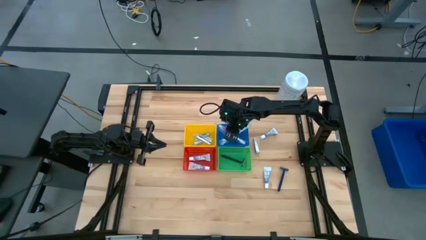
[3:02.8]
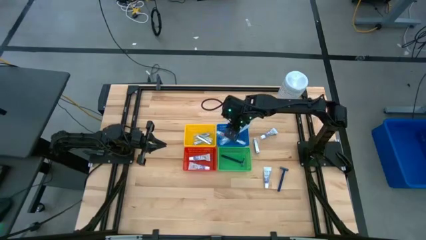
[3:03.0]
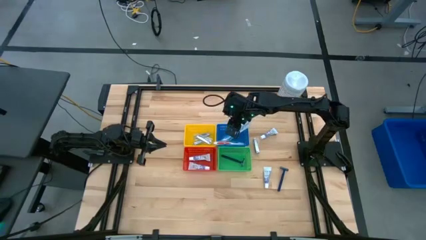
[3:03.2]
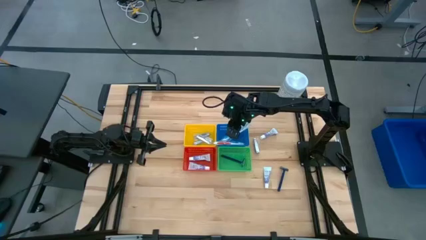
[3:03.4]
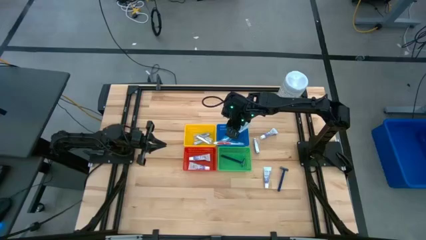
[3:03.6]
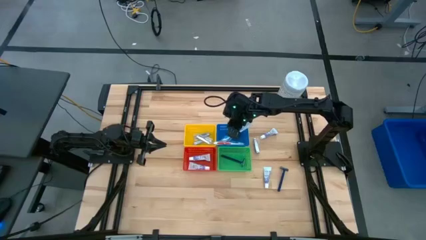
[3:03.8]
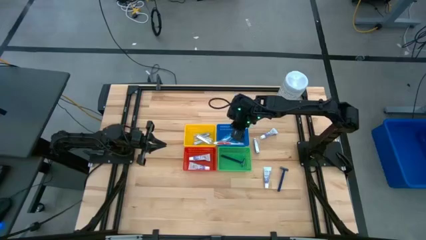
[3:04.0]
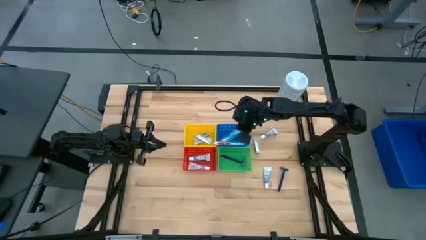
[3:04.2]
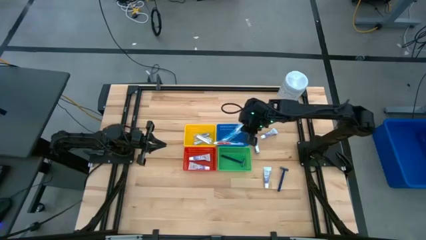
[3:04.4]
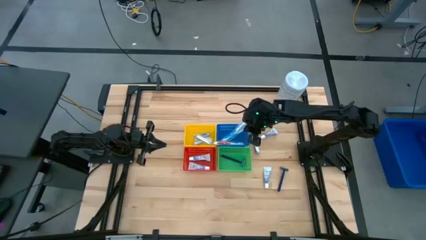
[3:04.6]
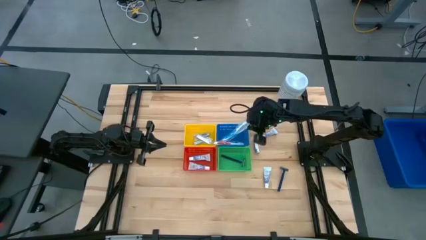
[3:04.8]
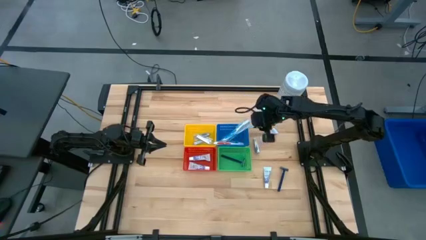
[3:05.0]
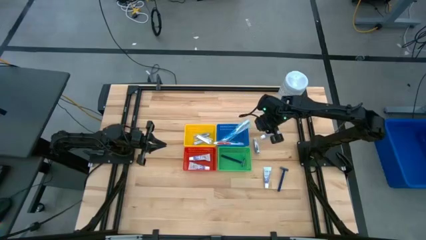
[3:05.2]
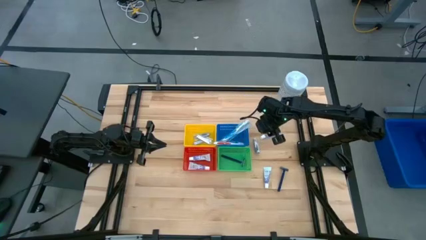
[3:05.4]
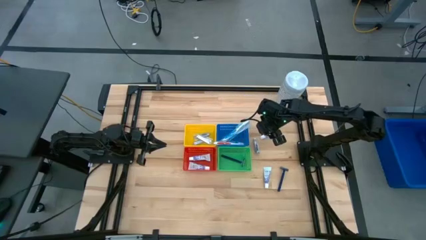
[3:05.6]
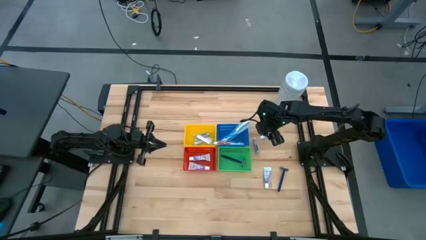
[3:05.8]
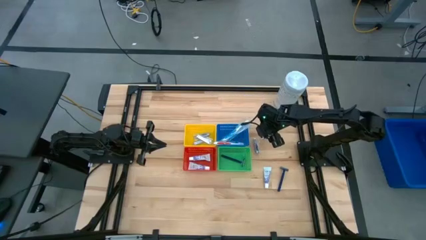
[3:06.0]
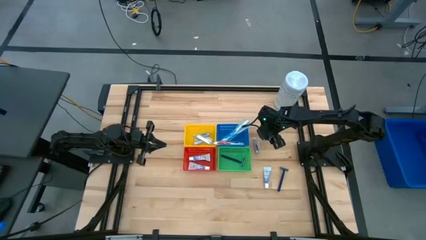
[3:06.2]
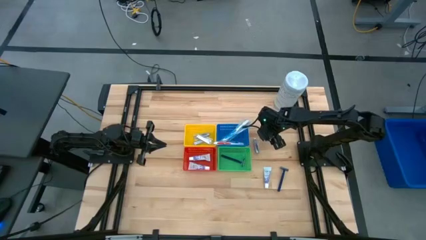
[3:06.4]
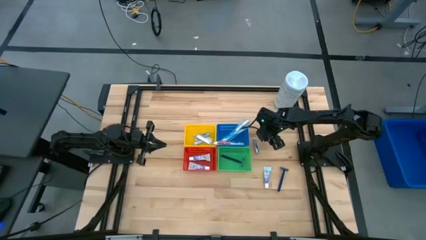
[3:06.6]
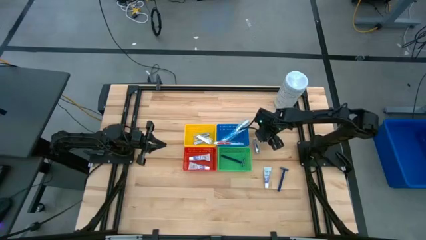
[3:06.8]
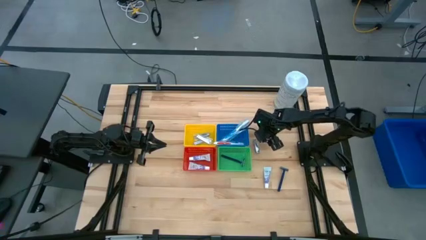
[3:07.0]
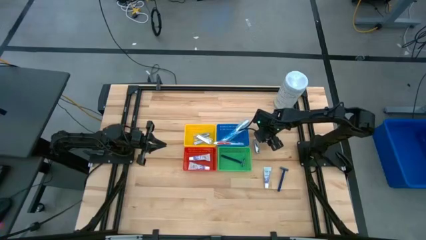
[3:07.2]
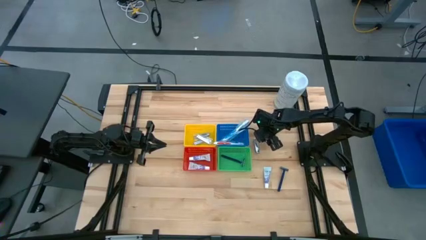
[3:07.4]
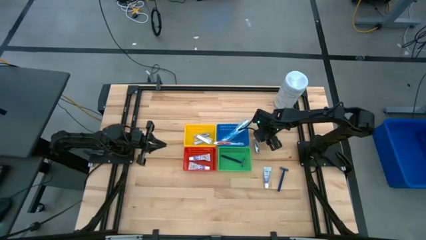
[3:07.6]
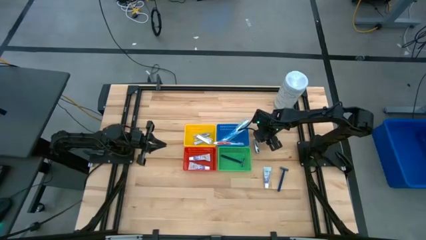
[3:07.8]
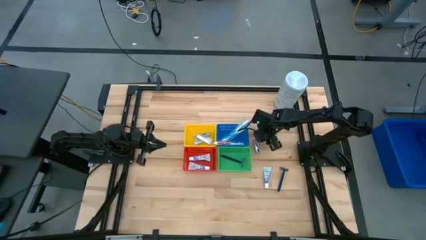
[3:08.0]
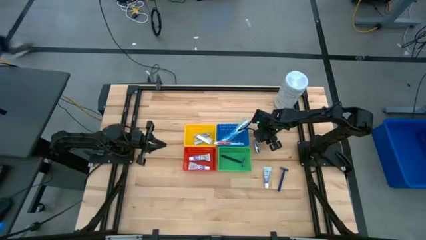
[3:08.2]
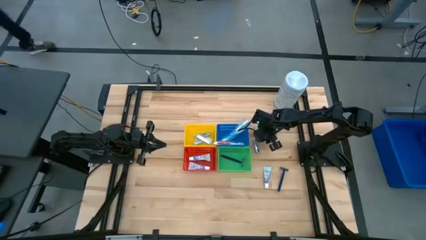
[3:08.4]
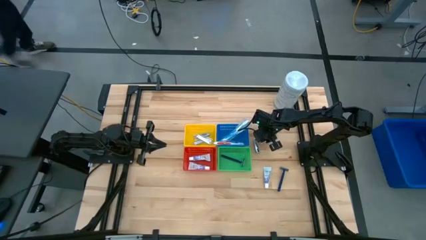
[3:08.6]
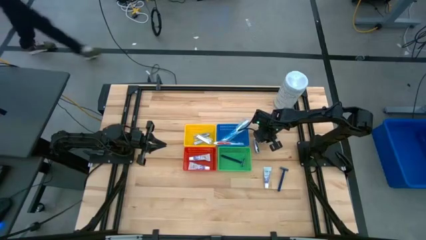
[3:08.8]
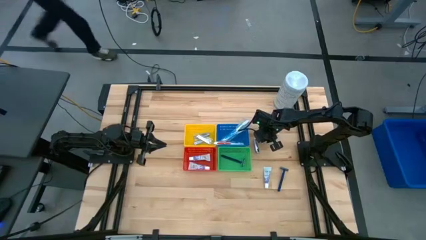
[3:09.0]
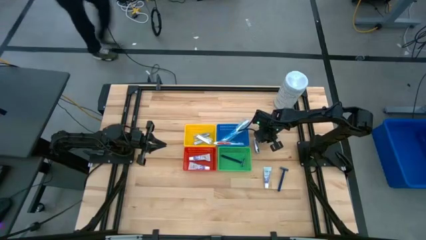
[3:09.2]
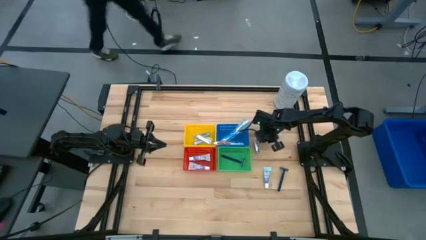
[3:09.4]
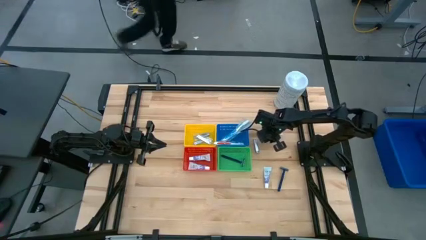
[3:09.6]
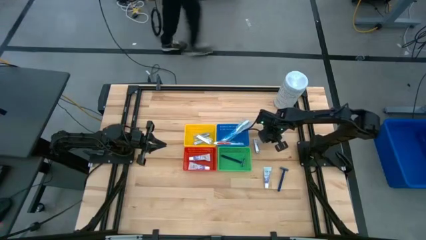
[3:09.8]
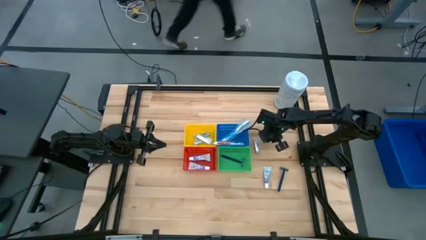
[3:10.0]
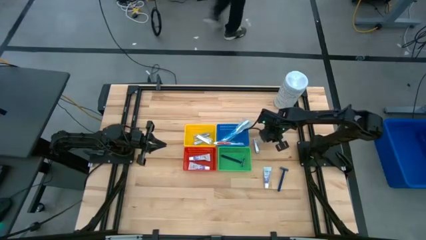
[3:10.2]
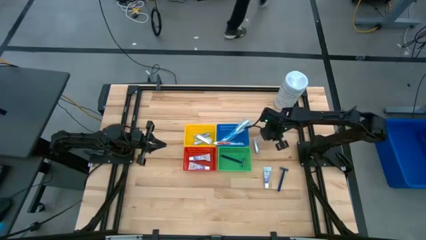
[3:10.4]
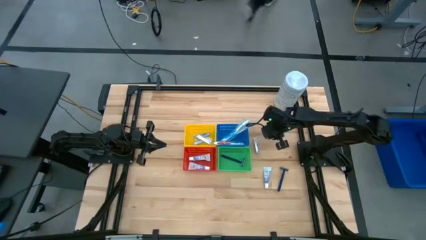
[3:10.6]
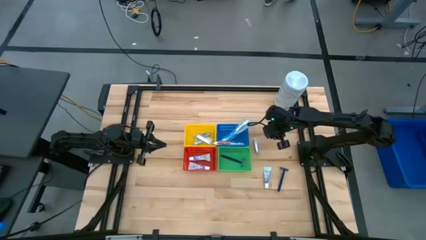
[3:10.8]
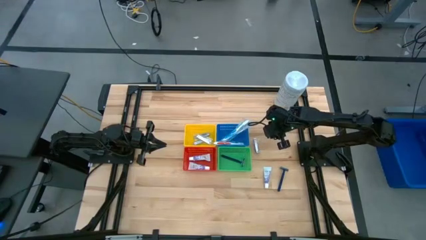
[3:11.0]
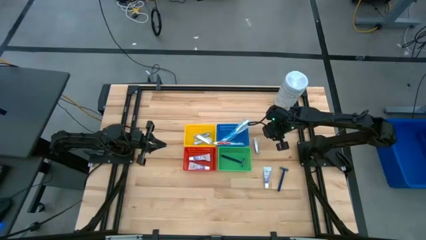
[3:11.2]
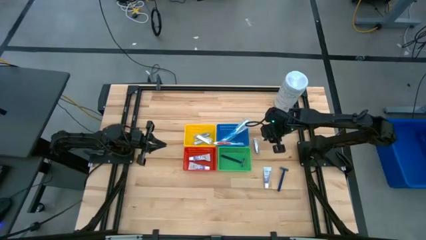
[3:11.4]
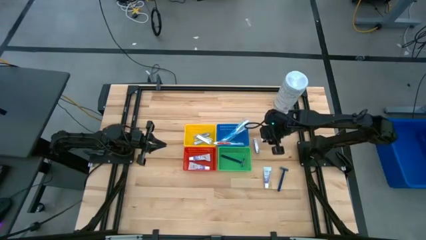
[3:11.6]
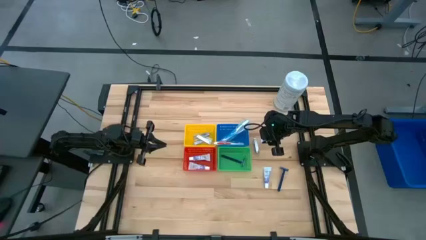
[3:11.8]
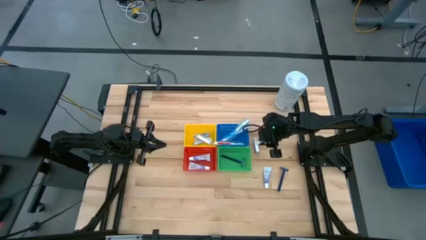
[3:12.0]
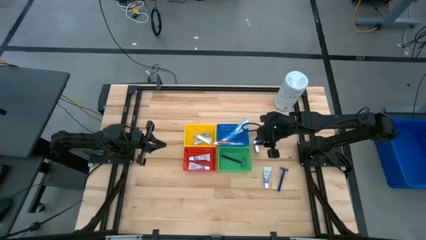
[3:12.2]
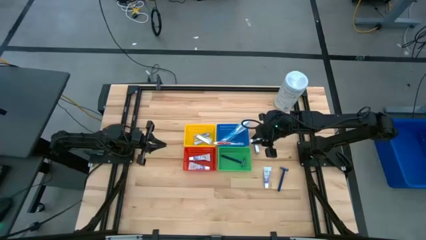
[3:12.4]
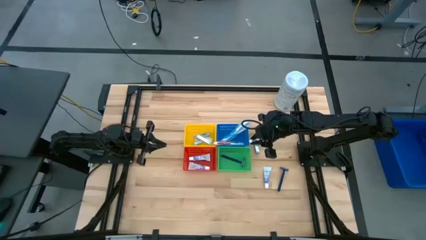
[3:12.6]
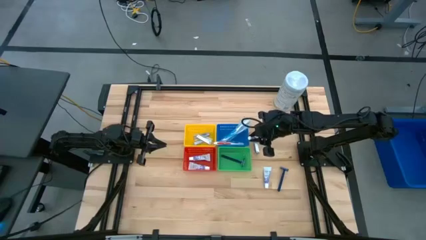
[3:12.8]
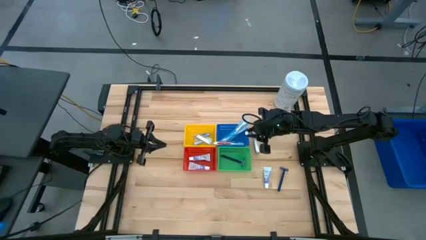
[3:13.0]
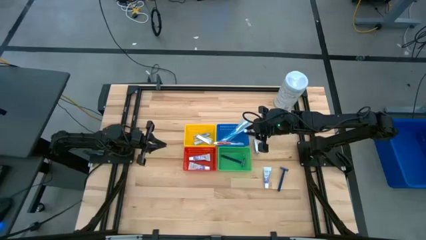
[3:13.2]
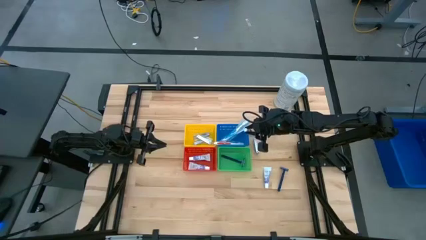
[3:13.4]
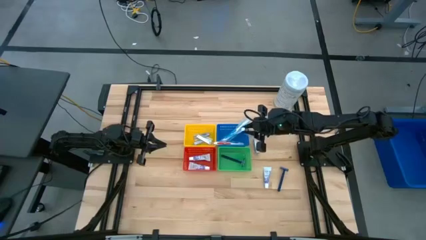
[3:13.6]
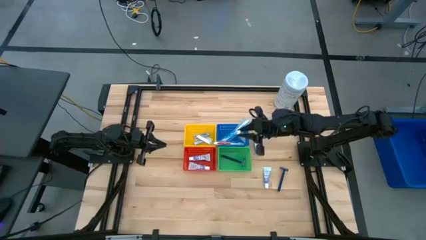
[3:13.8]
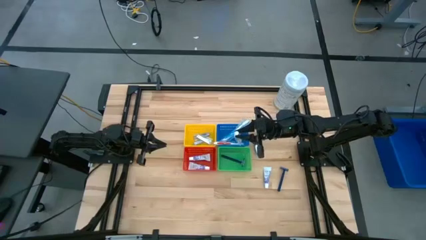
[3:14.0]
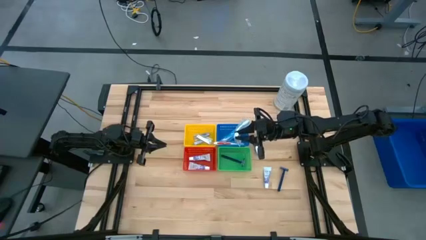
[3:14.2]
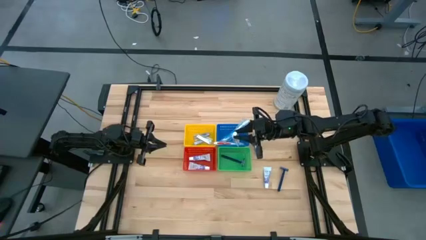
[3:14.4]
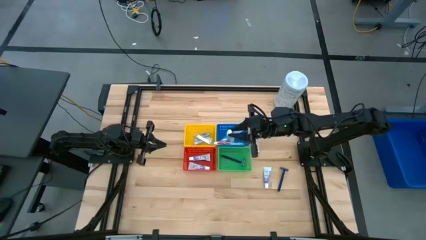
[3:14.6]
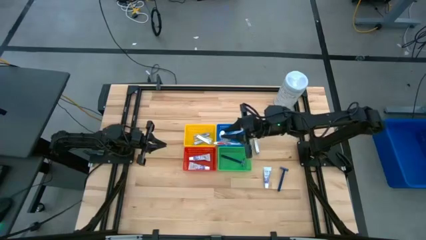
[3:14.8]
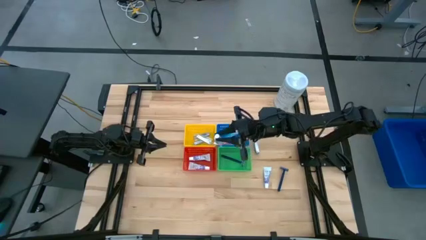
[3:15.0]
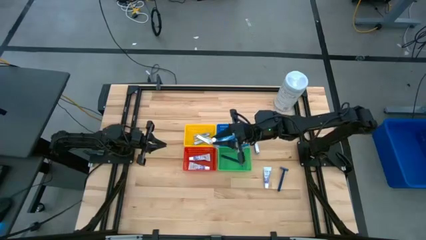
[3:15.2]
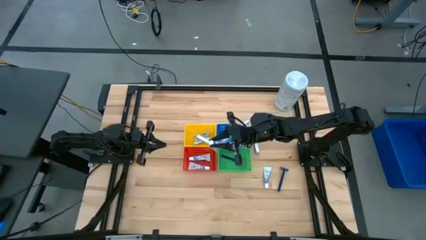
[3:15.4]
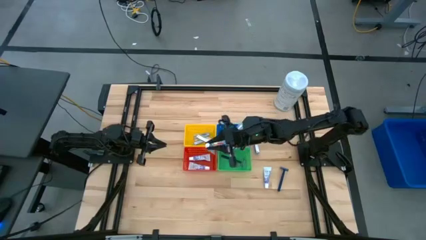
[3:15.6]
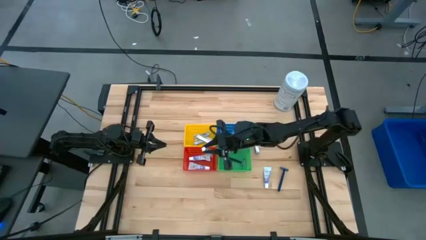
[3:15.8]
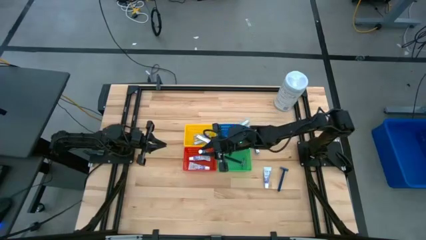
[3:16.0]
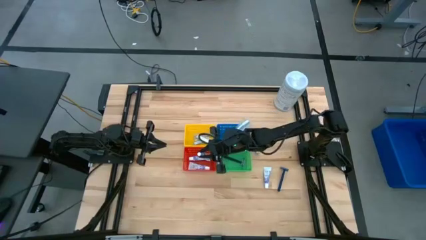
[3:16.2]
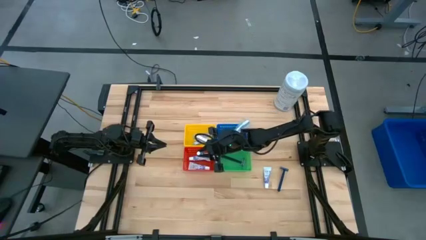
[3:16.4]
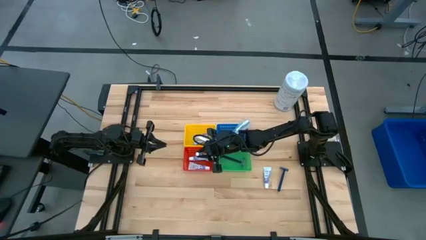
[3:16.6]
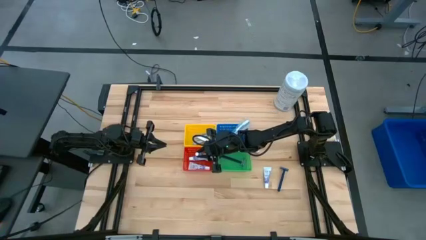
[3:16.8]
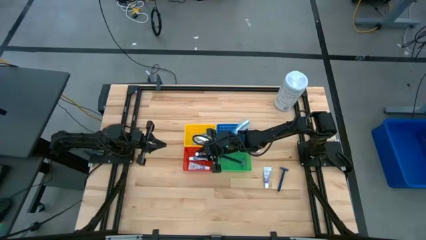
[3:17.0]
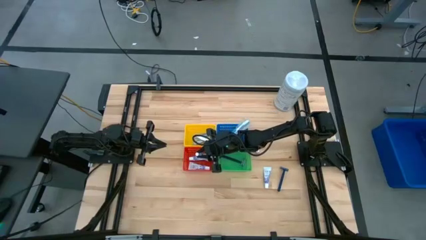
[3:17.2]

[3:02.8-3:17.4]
Task: Pick & Place Travel size toiletries
Put the middle right toothpaste into the red bin

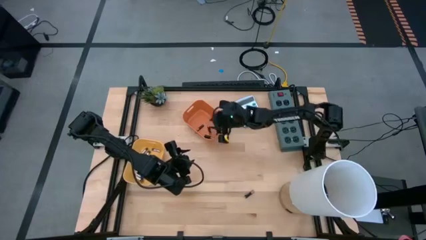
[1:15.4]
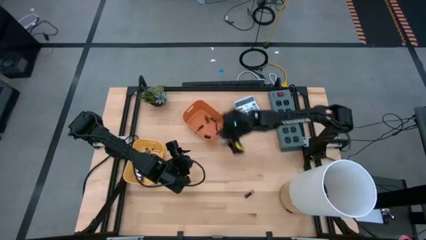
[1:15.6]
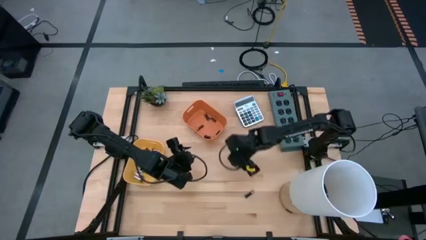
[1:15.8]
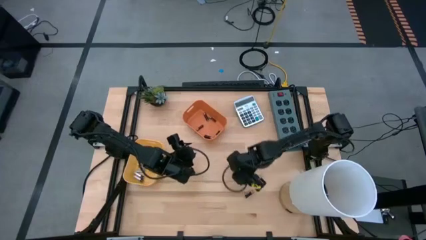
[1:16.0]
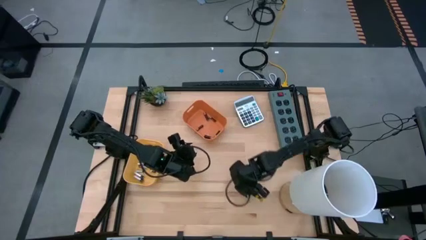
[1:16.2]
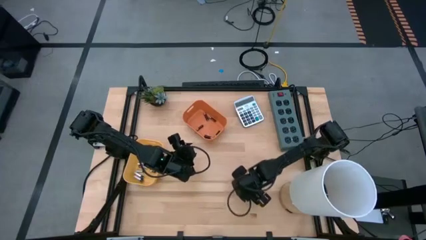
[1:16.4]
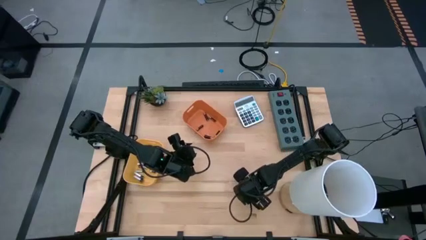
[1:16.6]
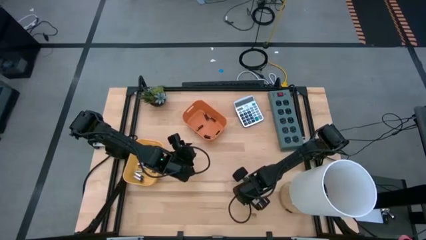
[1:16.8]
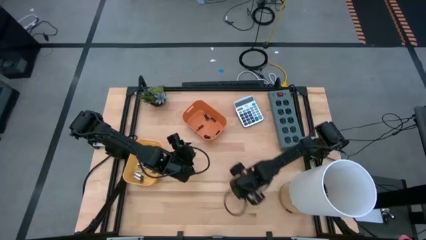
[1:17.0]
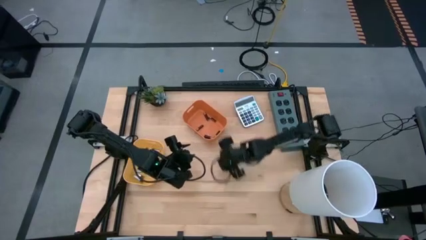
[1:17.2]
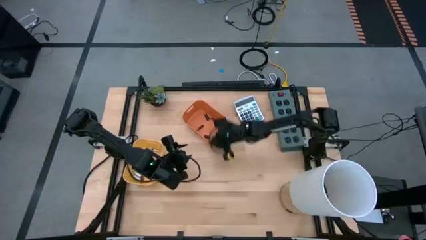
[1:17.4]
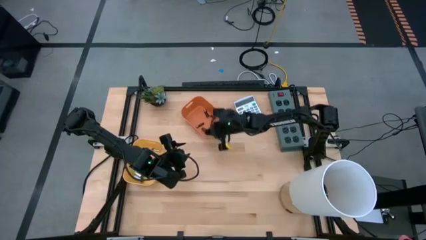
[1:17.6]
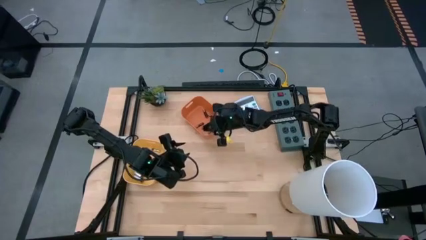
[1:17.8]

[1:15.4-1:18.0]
Task: Sort batteries
Put the black battery into the orange bin
